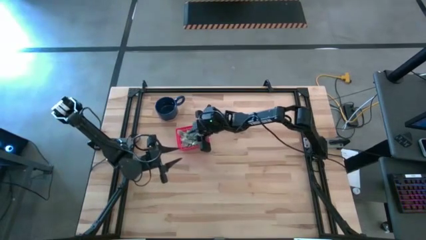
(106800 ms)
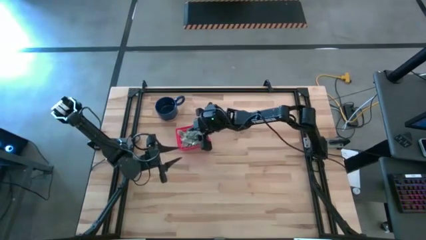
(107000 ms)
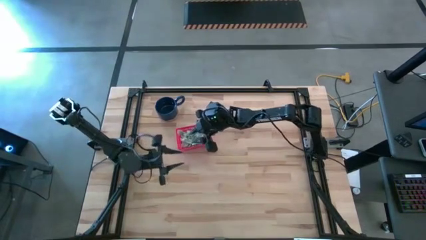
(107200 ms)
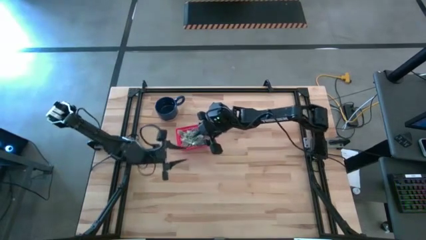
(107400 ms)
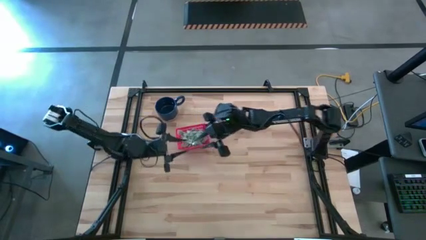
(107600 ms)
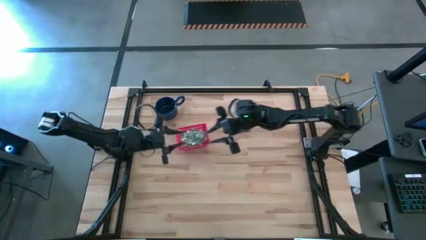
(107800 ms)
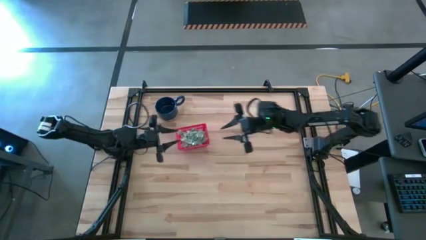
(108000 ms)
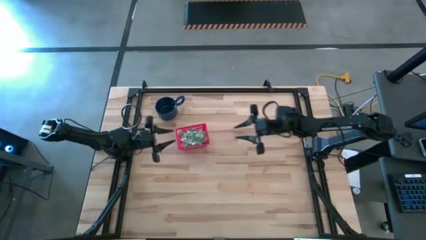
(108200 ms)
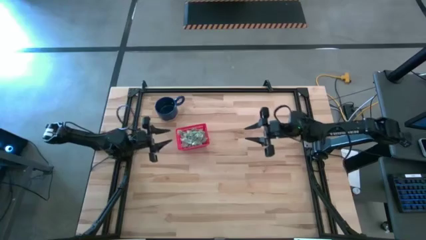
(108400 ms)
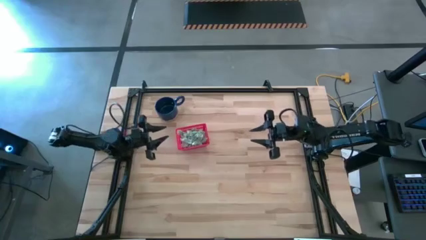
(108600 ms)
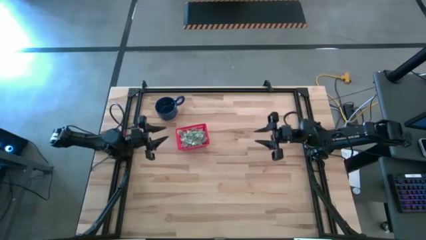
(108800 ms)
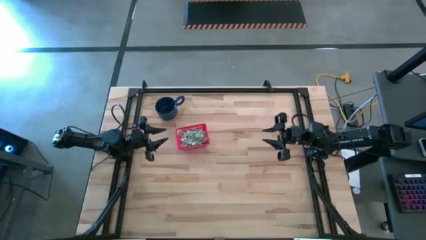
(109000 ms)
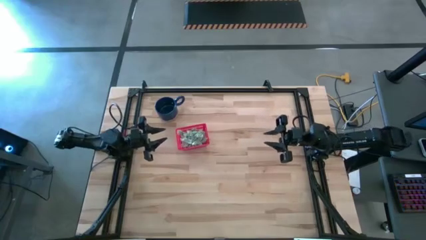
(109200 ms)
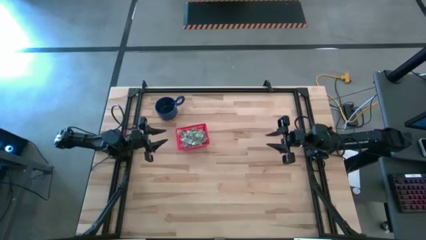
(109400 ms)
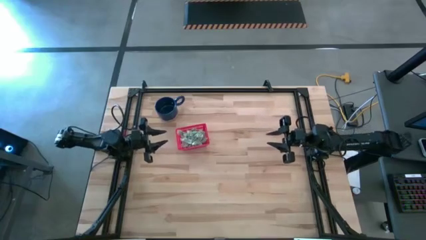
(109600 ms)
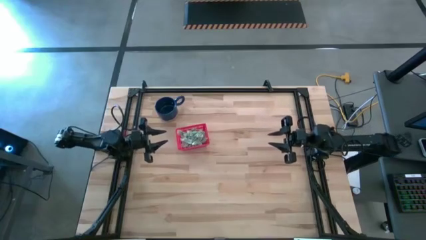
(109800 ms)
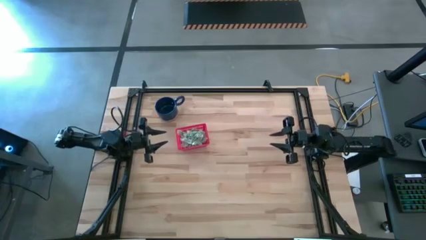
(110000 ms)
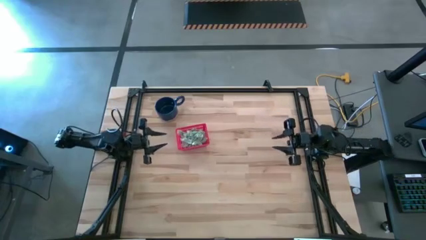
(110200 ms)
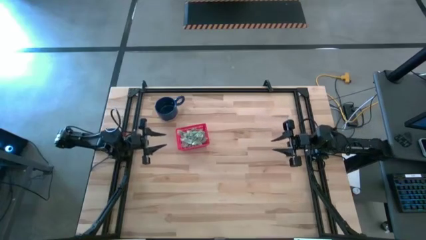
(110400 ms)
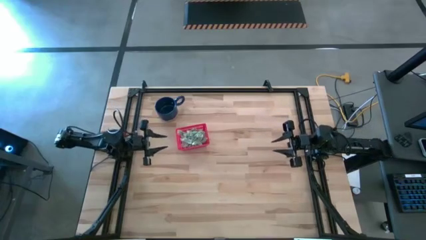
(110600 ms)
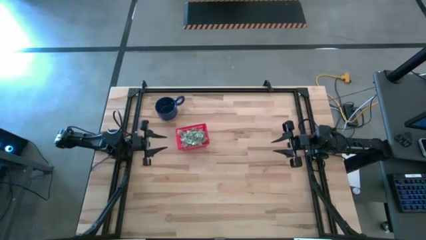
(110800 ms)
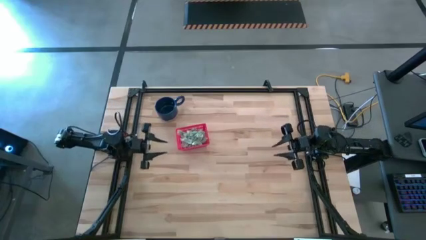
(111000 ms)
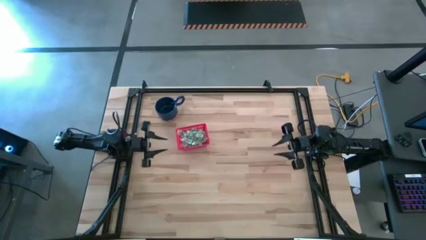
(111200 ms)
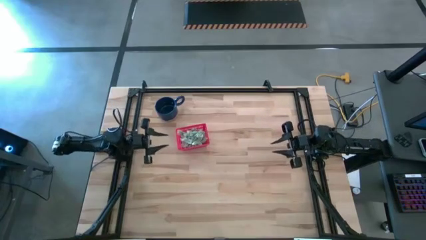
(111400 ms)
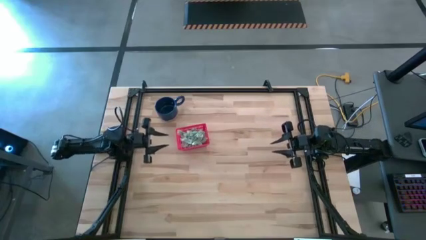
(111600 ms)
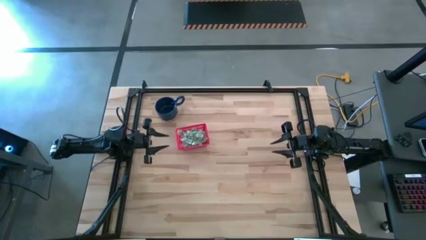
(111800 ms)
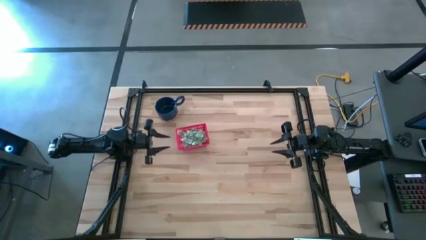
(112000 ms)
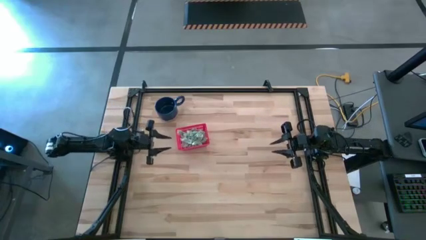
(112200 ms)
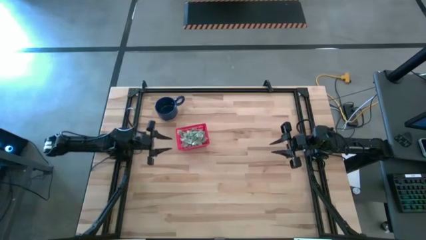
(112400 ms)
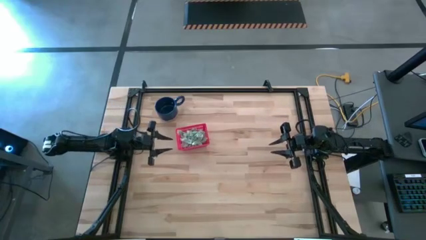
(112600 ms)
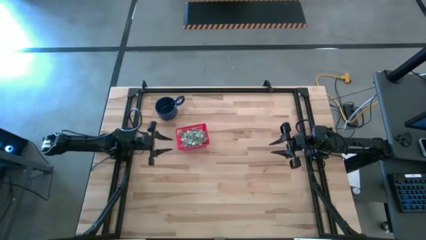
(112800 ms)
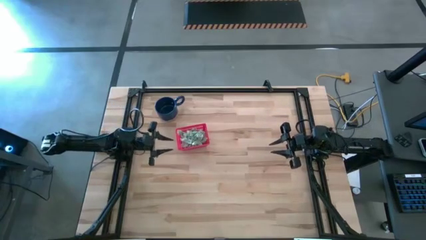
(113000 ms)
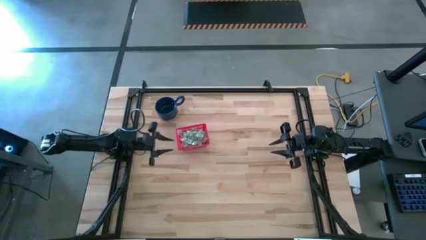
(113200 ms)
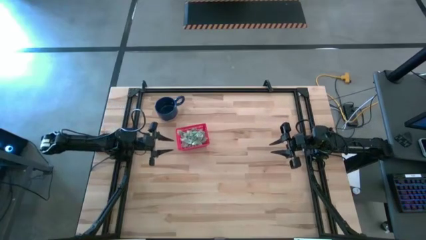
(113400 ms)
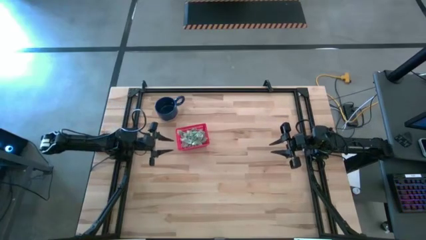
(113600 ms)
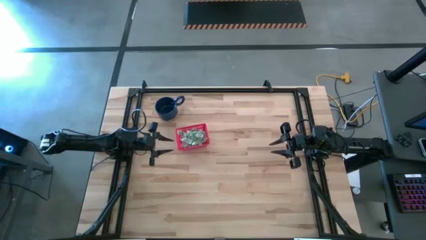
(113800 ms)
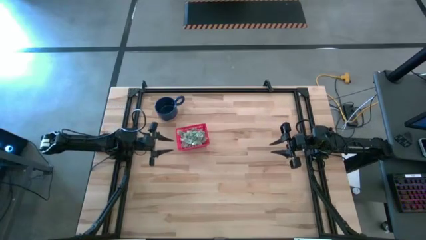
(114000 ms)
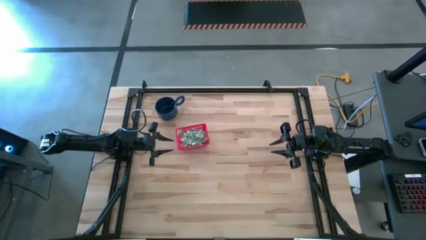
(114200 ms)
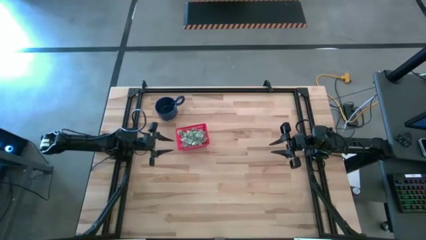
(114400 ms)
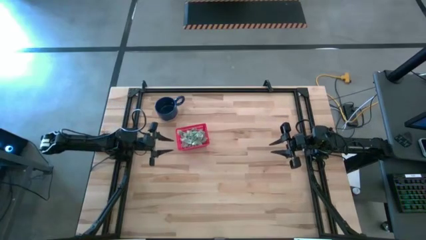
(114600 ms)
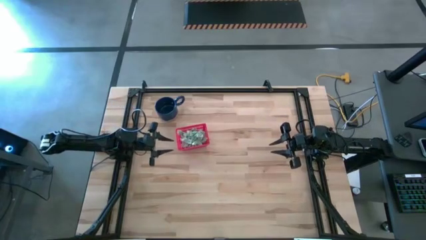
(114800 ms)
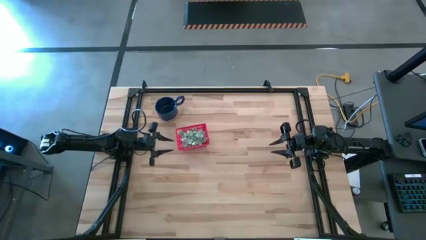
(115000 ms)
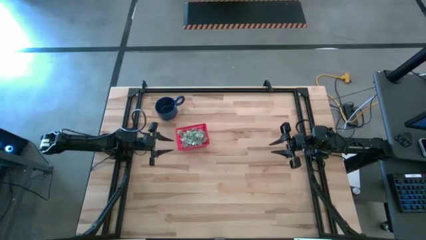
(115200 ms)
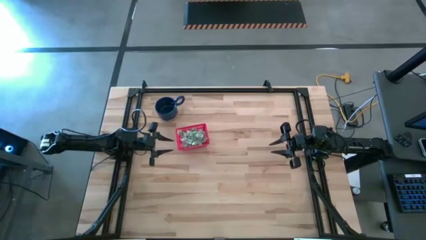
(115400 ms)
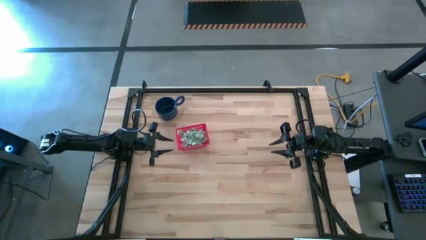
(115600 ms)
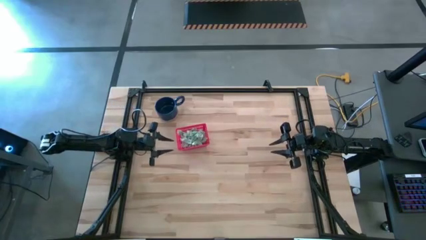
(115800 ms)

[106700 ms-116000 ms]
Task: Pick and place items into bin
Return to Home Position

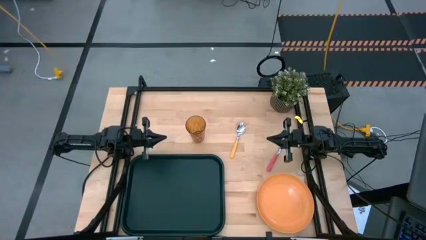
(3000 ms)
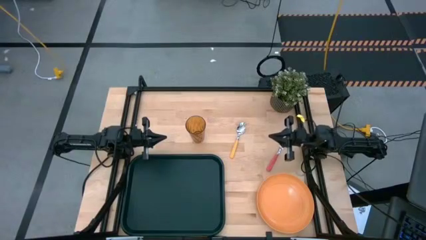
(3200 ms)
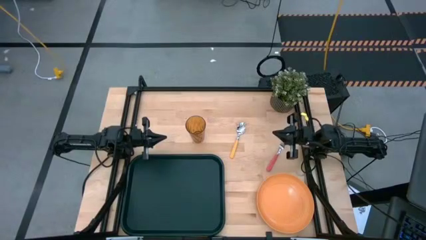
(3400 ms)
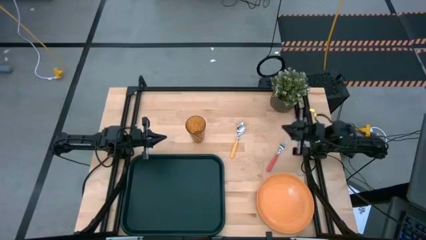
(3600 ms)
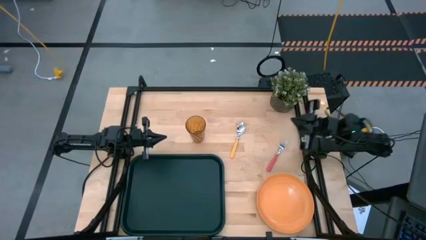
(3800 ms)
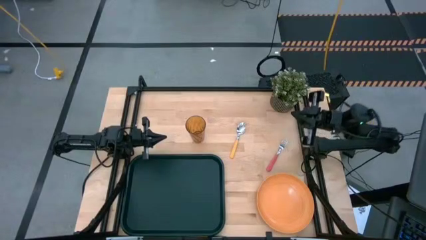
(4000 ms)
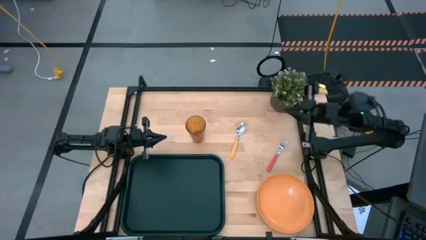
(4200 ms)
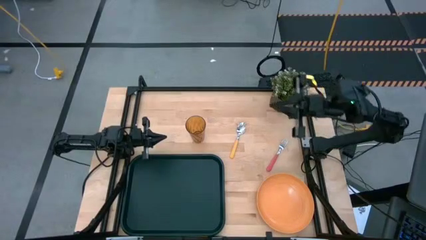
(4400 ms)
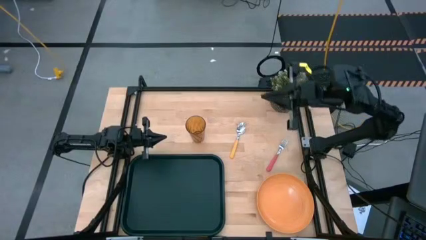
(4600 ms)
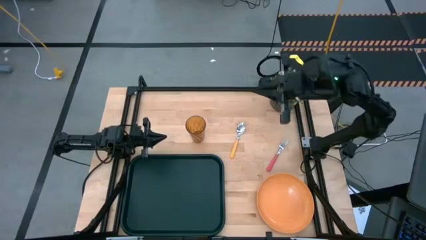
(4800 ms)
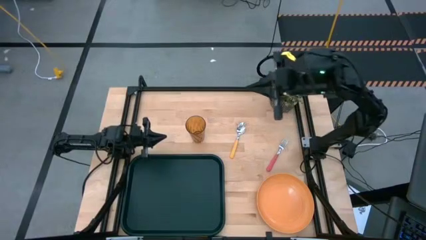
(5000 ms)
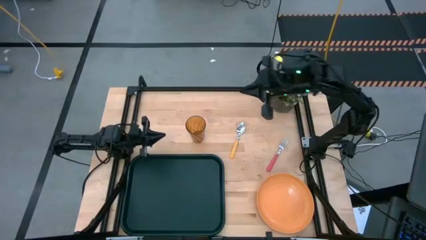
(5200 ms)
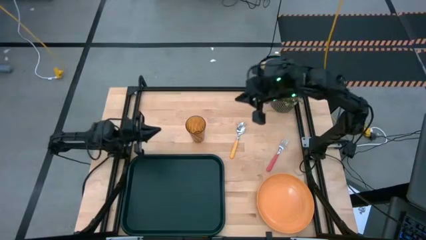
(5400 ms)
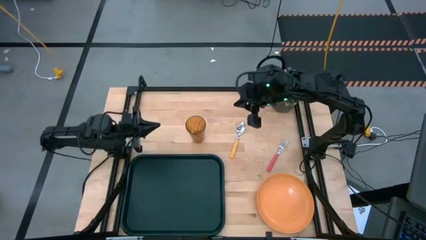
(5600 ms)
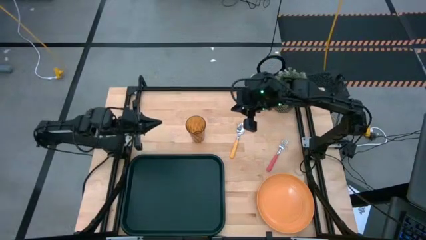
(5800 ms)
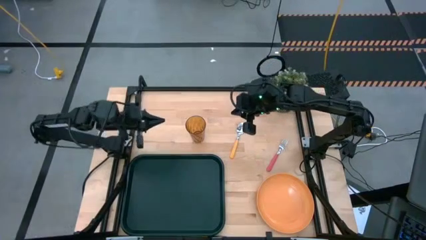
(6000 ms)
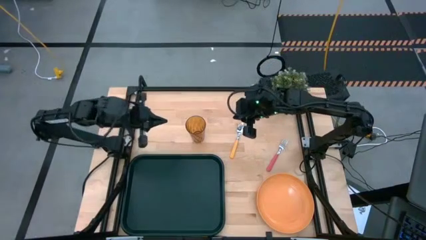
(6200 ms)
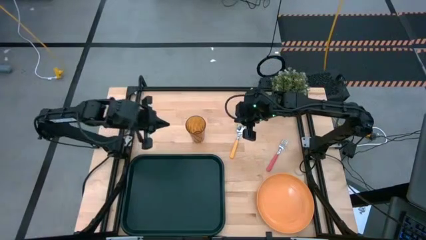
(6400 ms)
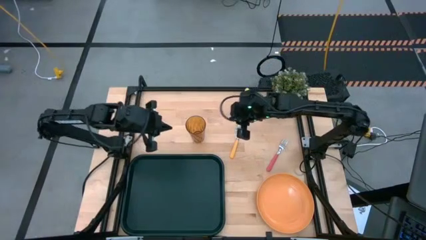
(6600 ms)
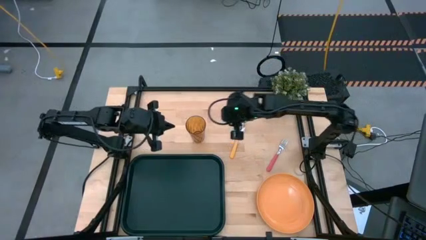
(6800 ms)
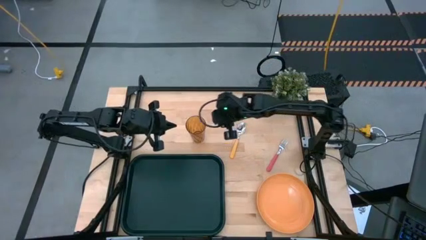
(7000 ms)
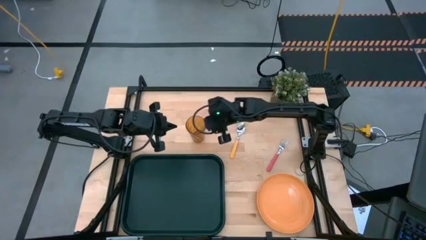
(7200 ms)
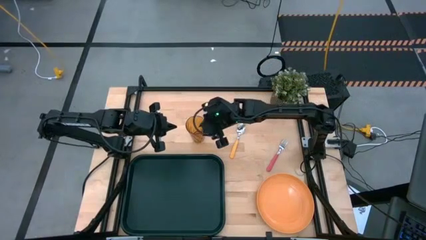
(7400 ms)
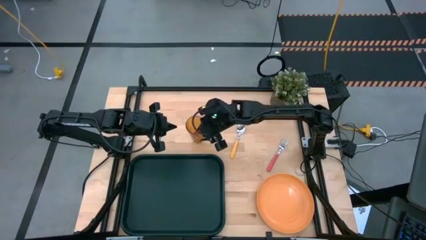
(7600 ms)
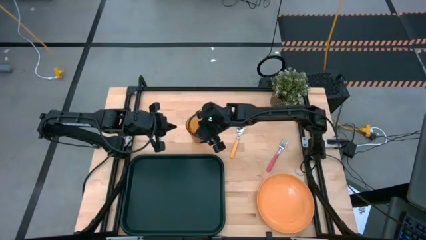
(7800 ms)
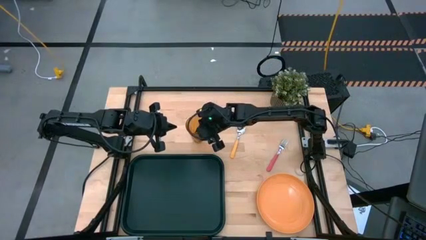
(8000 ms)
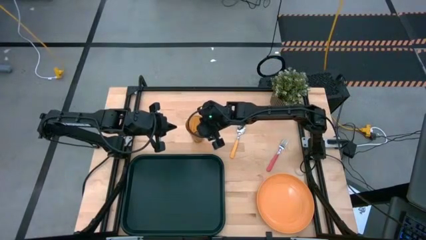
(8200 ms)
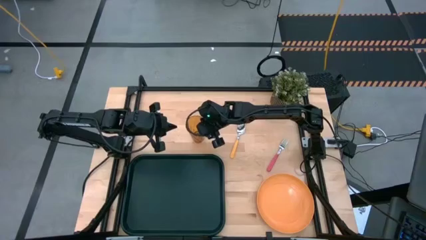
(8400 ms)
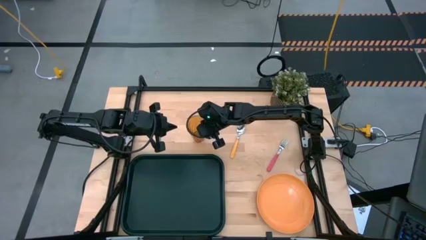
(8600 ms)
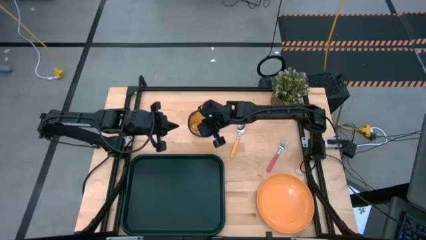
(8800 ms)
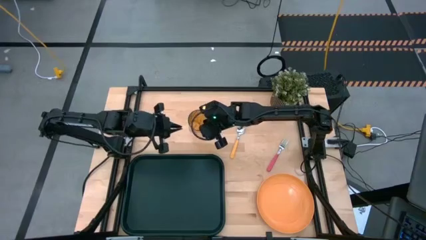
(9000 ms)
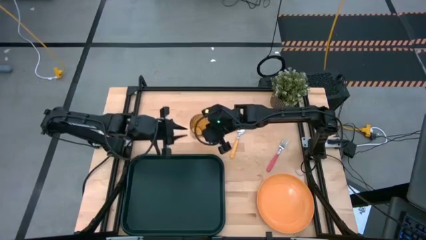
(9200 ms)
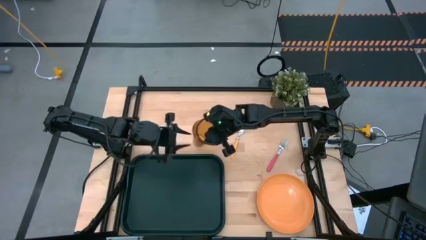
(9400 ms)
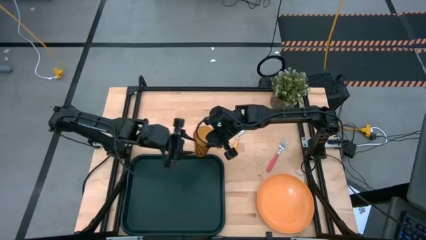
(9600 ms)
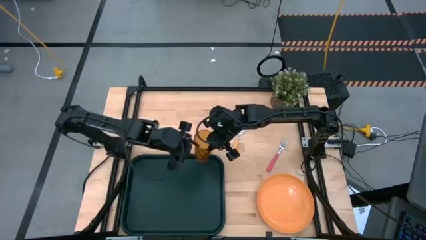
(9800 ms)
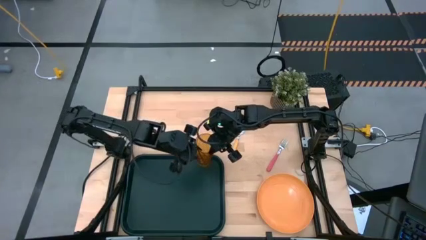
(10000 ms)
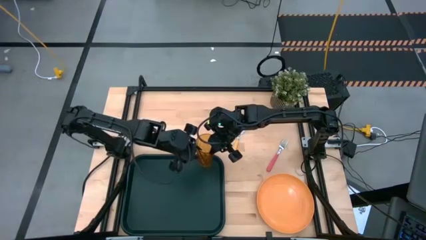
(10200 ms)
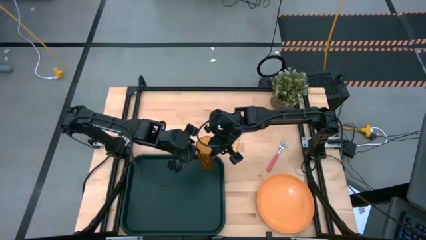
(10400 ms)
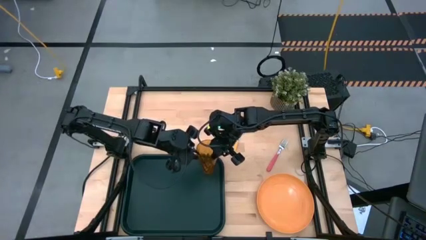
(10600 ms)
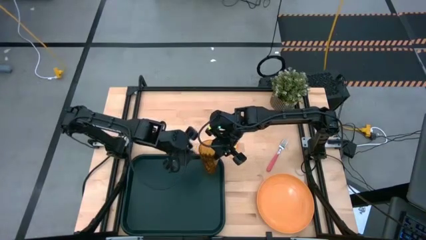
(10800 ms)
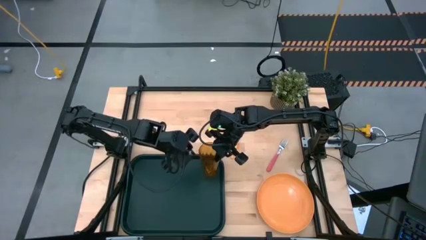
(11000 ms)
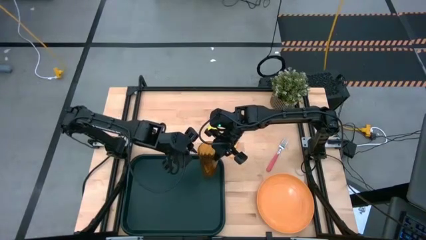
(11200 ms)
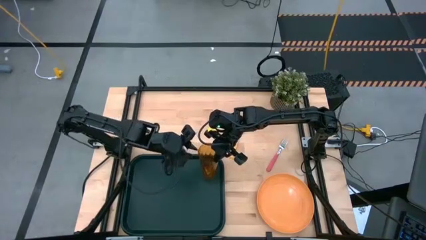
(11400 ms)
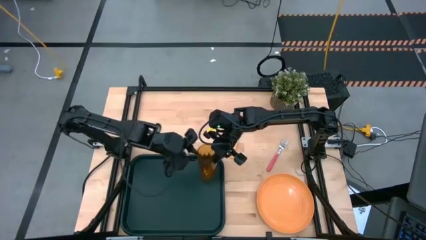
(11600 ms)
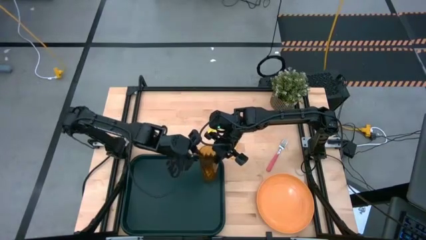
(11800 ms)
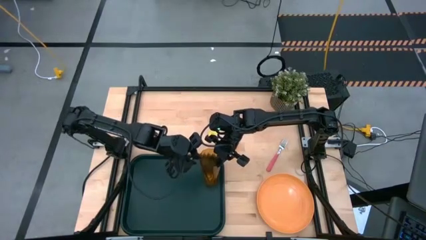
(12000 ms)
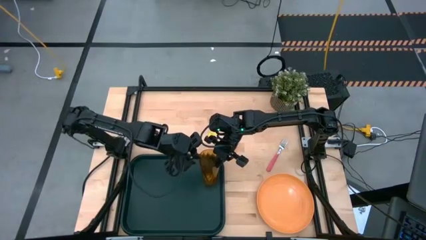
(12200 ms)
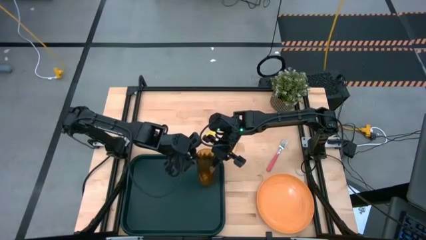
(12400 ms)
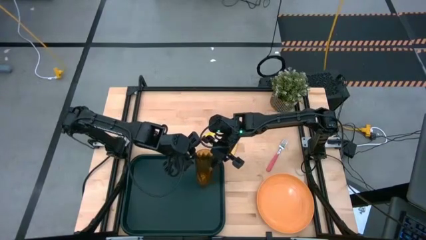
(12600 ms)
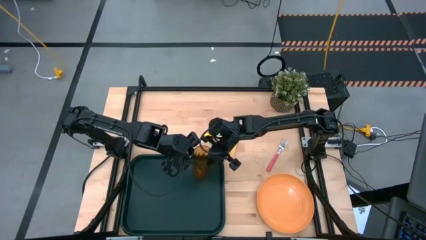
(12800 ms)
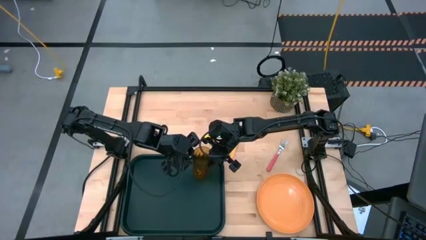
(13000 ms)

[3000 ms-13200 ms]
Task: Pick and place plate/cup/fork/spoon on tray
Put the orange cup on the black tray
